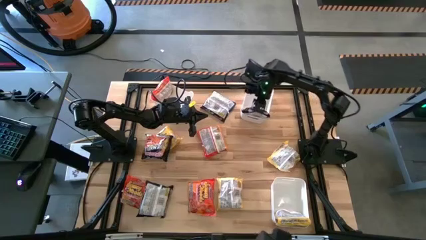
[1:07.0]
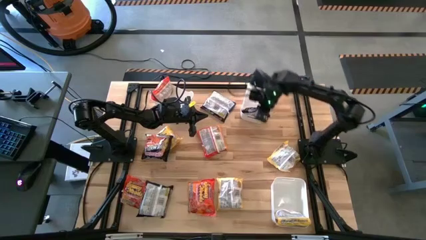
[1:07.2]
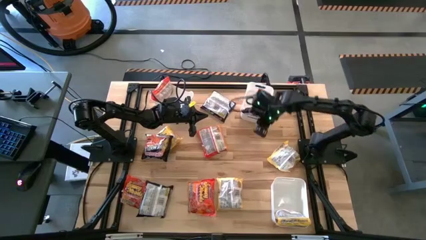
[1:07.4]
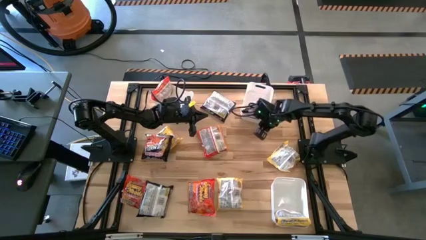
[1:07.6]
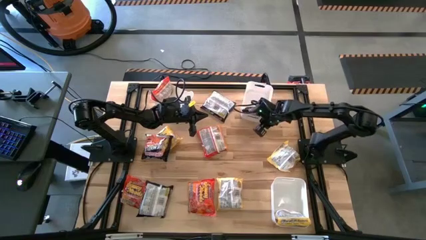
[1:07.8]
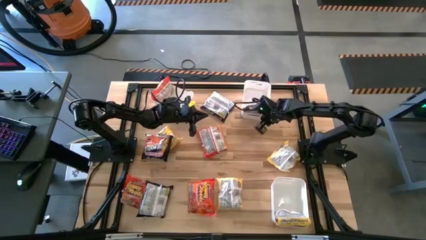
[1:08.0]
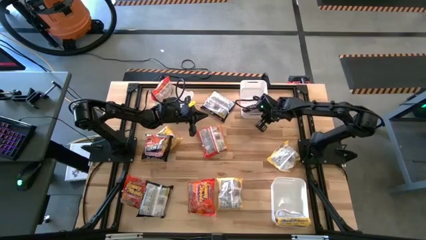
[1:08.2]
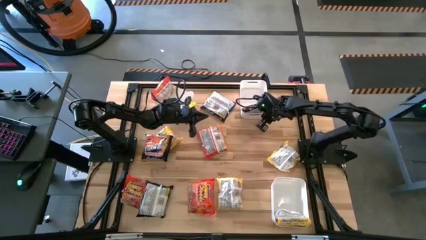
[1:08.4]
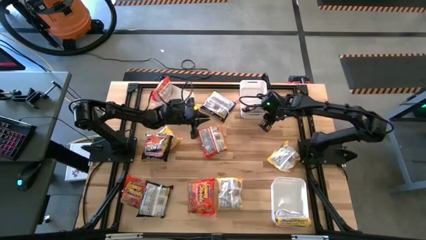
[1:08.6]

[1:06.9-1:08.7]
Task: Sort Maruchan noodles
Adjust the top right white bin

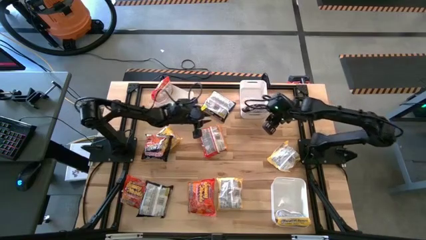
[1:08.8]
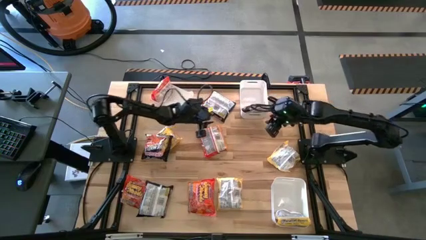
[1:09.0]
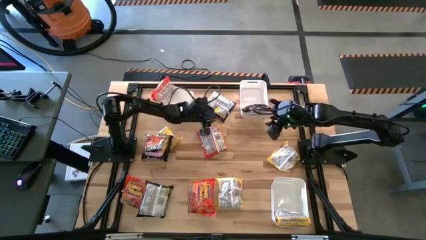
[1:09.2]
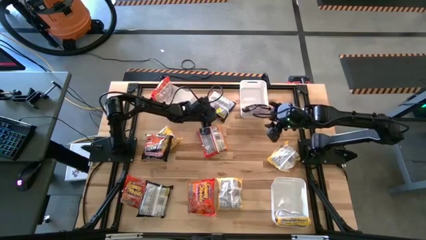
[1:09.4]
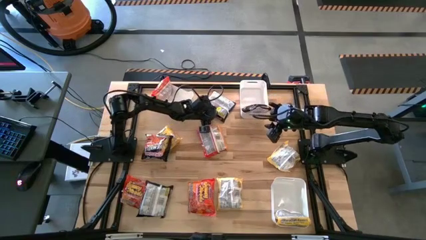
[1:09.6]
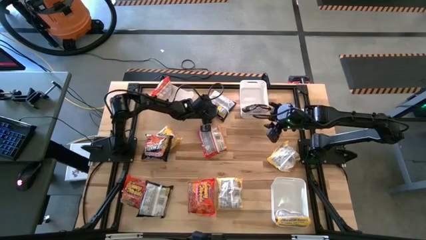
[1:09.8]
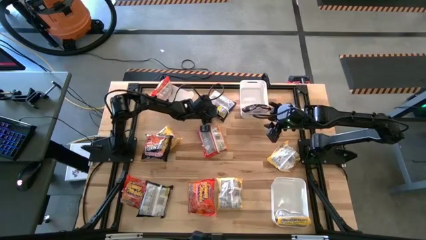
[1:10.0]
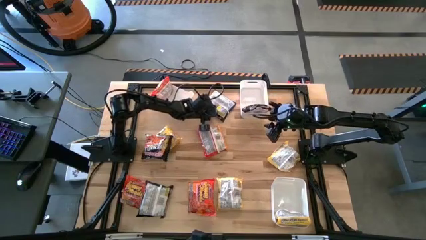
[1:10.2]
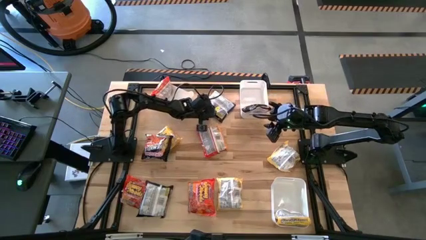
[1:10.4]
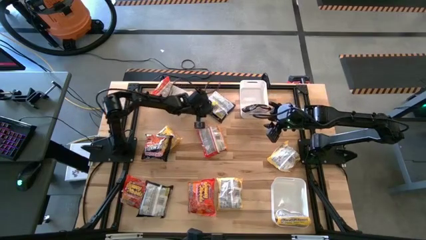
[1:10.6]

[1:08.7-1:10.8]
Put the black noodle pack into the top right white bin

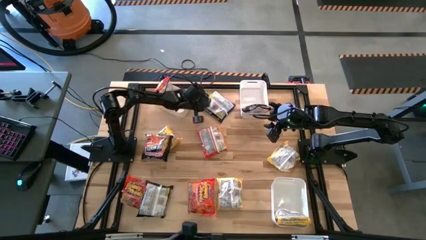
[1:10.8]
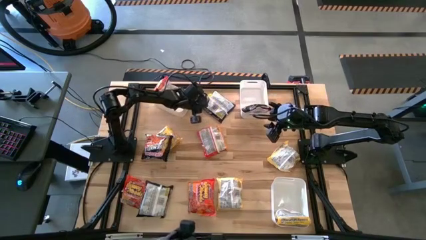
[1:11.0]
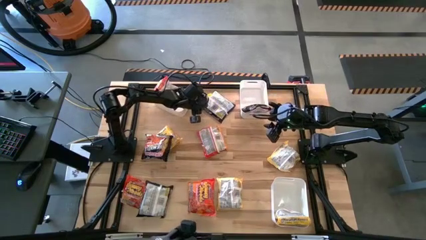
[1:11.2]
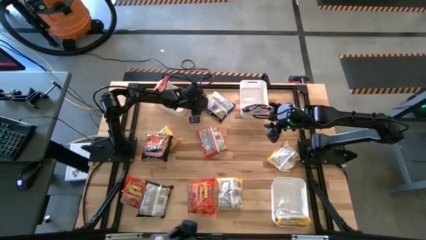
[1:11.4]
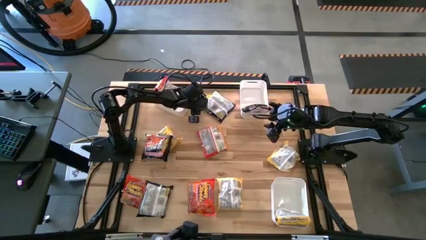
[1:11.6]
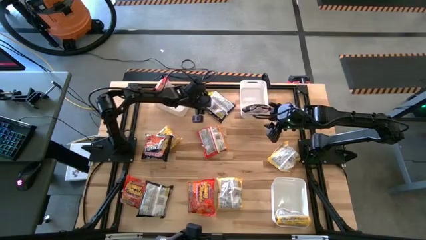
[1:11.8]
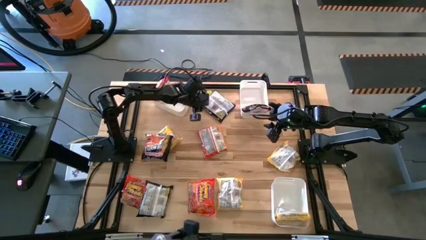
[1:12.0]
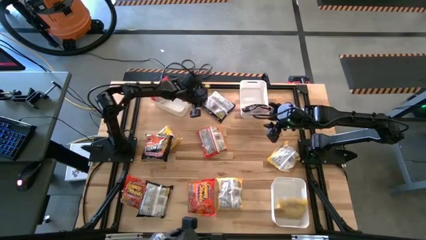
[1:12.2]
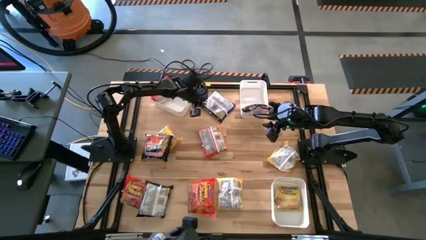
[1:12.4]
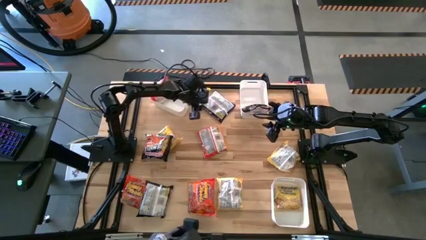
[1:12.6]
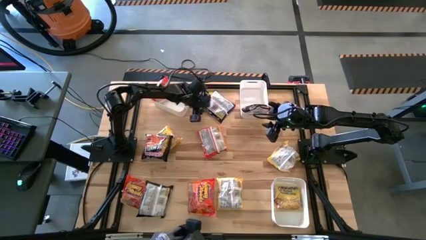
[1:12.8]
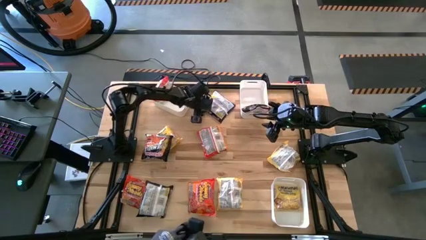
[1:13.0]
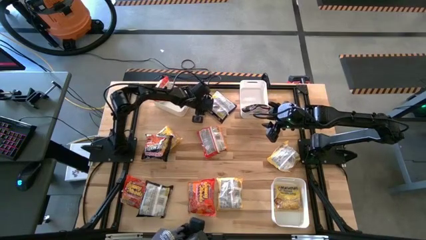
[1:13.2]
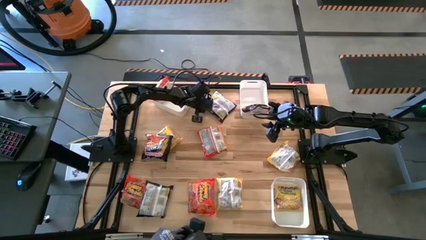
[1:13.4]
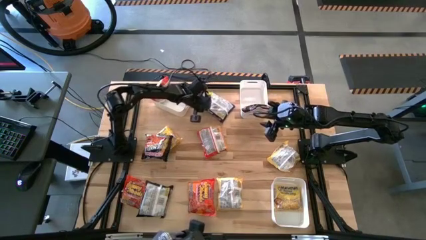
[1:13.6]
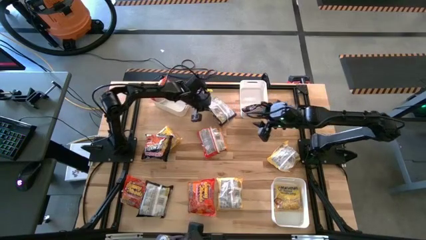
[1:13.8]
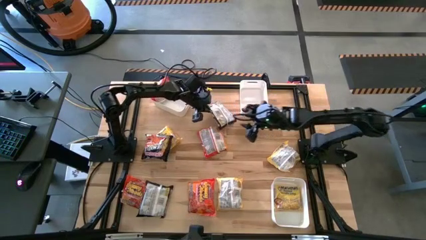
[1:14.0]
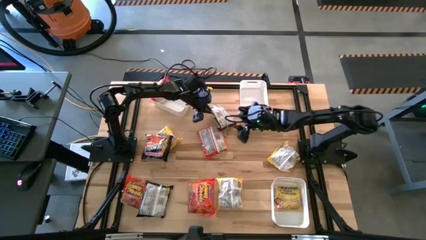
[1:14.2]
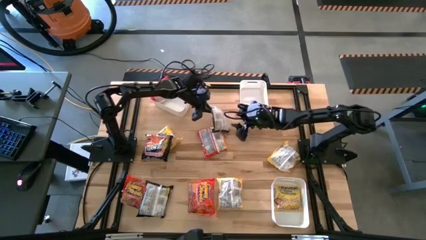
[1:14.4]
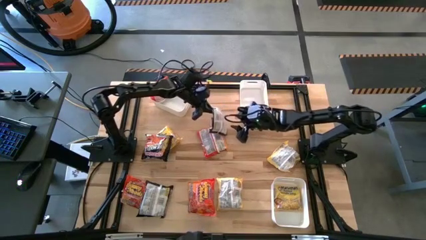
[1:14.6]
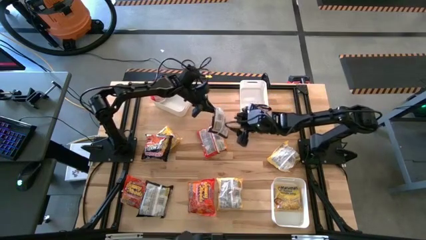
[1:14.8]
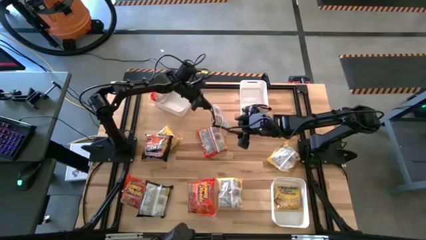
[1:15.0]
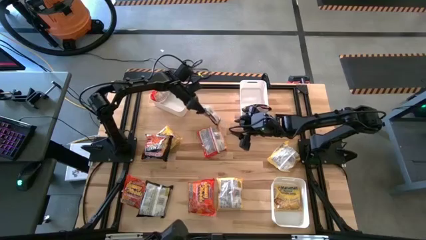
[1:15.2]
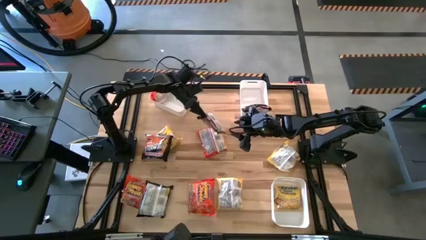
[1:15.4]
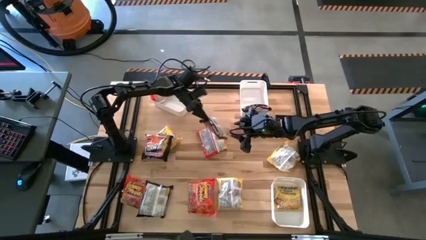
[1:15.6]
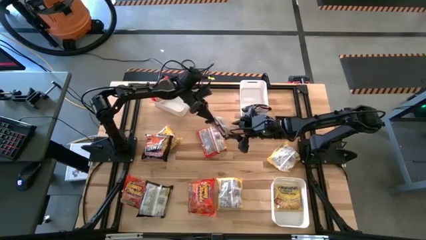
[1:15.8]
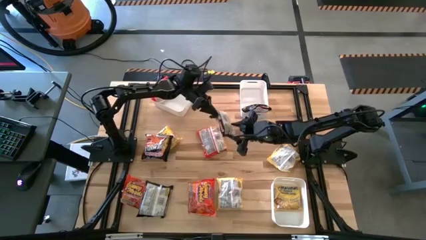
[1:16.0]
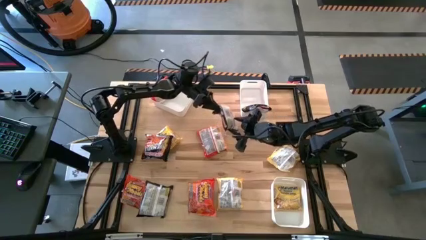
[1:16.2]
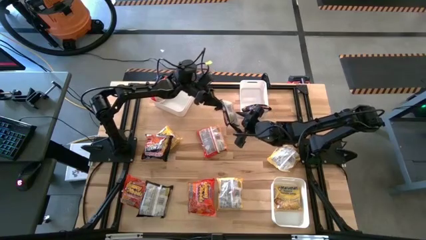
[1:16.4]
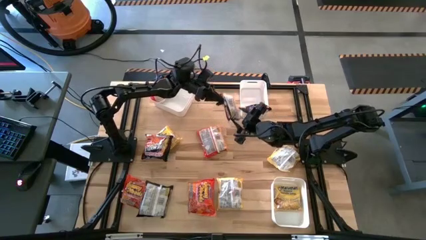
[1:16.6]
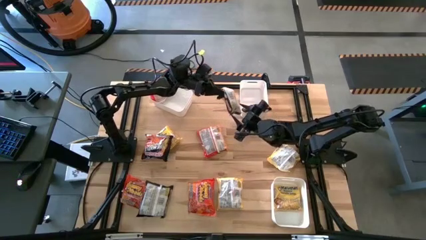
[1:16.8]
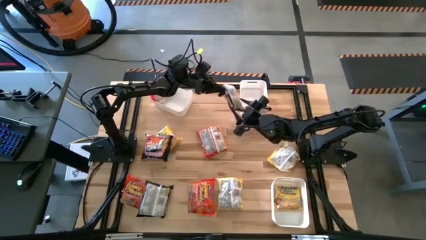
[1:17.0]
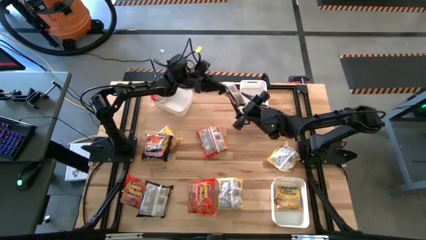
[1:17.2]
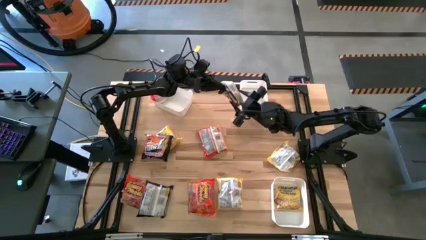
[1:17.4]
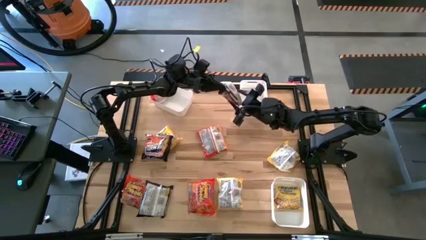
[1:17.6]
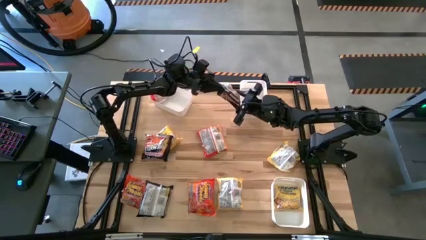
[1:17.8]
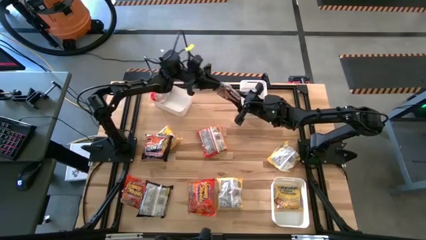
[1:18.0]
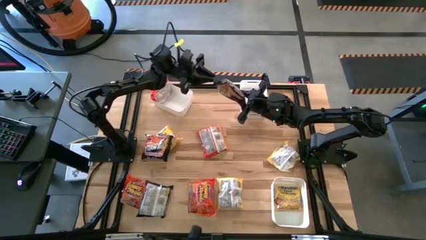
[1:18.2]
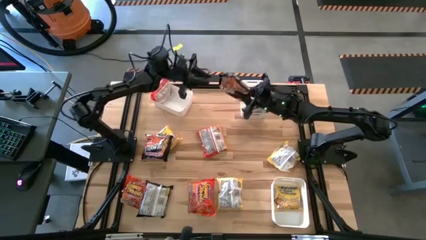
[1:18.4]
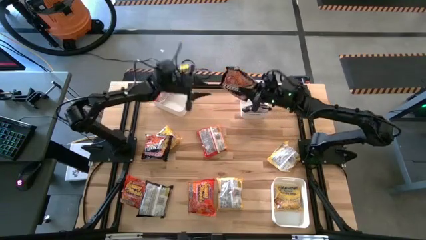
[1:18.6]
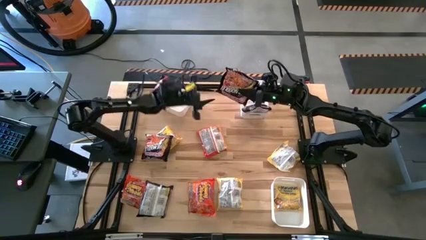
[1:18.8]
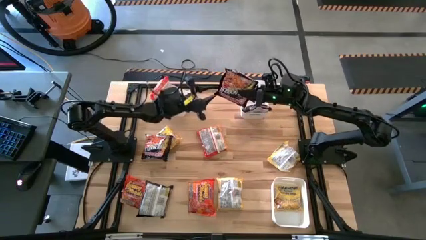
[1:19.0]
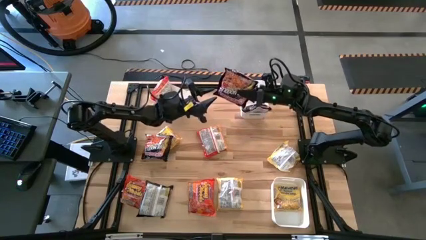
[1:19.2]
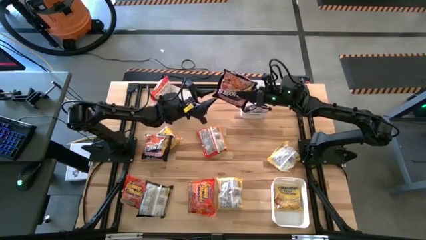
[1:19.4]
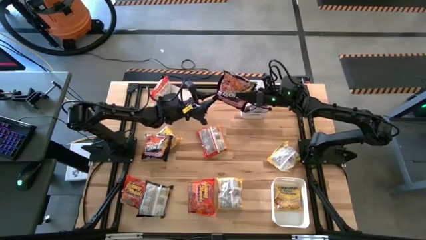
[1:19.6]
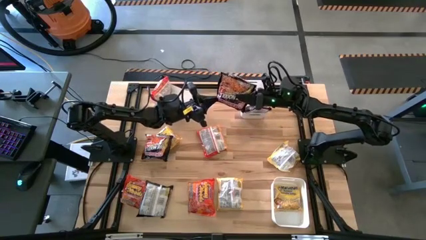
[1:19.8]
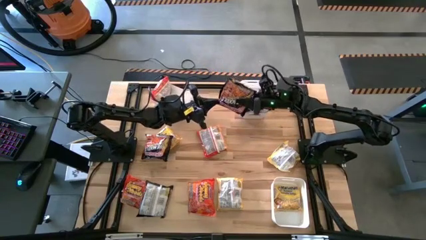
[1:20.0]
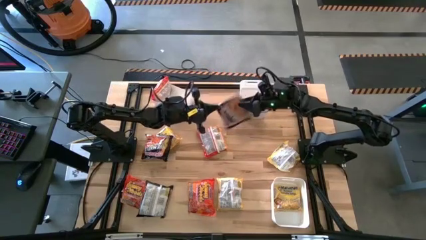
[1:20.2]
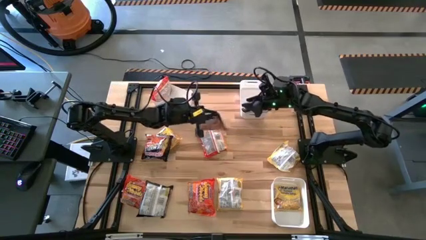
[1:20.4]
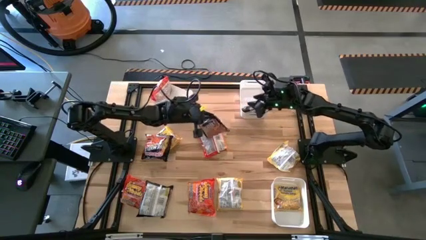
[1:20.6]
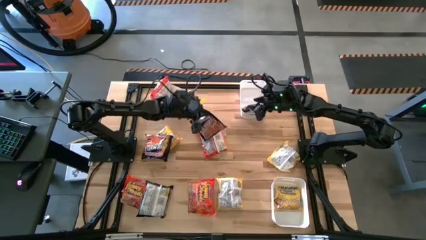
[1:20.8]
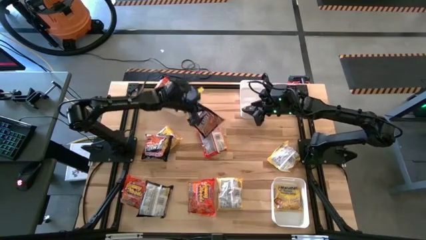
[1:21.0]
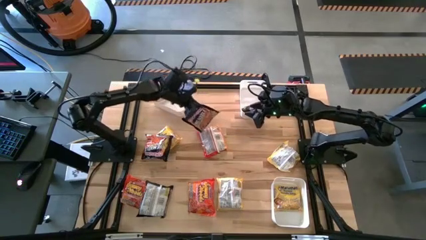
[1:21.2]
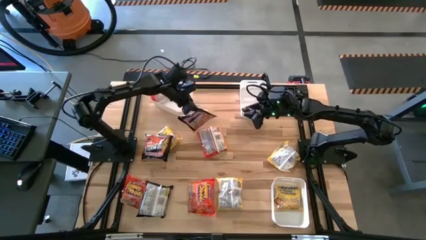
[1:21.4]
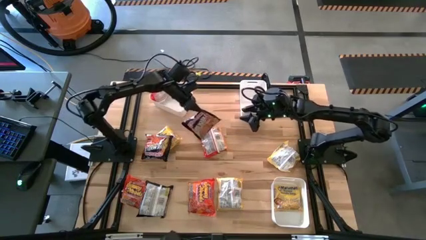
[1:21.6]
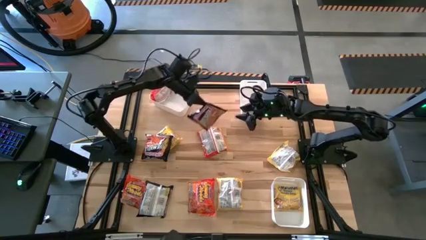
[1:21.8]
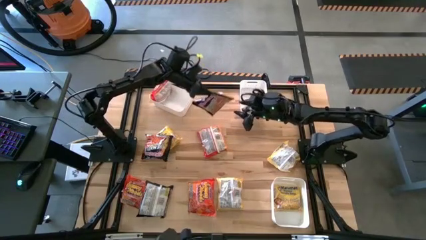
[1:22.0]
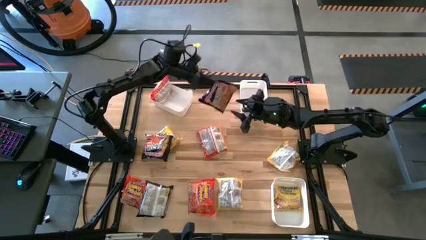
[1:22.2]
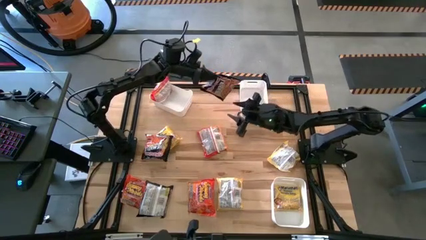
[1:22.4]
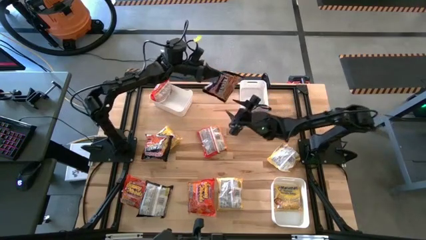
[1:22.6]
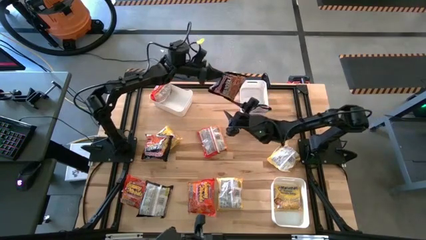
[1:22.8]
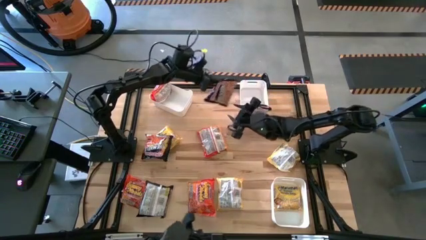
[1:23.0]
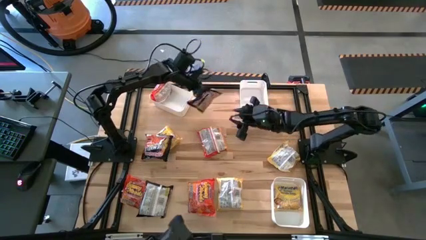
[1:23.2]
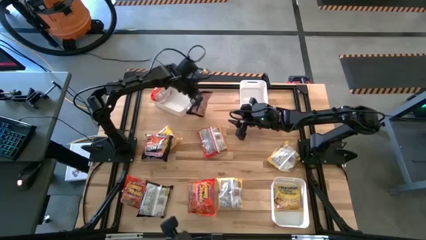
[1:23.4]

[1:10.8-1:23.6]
Put the black noodle pack into the top right white bin
